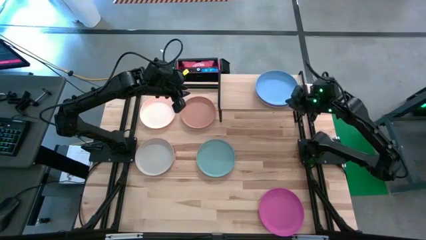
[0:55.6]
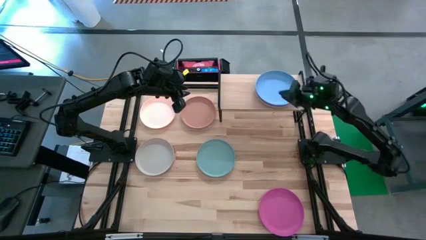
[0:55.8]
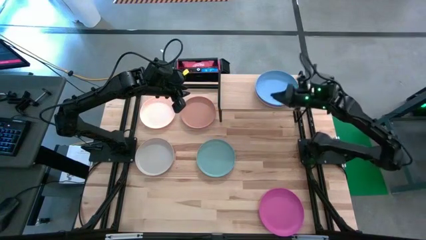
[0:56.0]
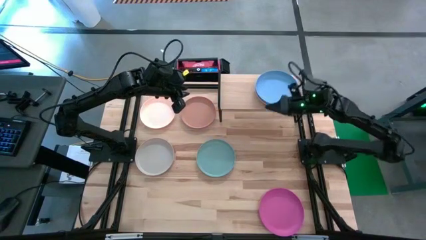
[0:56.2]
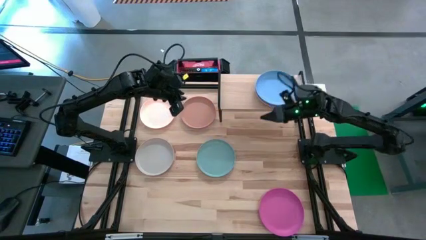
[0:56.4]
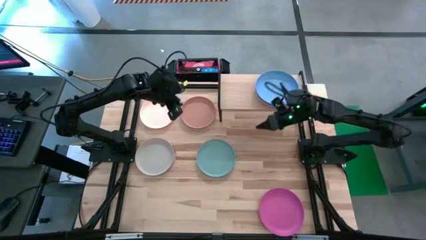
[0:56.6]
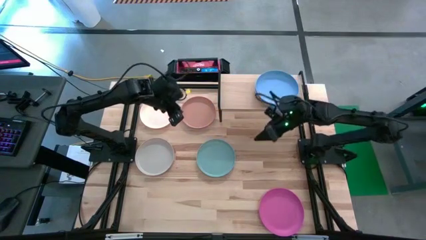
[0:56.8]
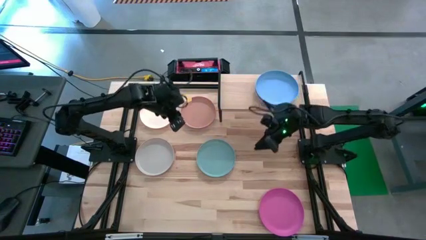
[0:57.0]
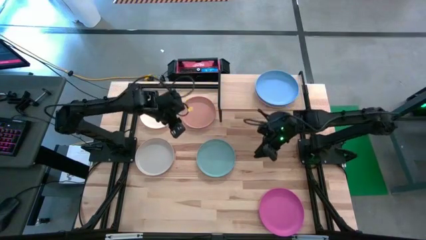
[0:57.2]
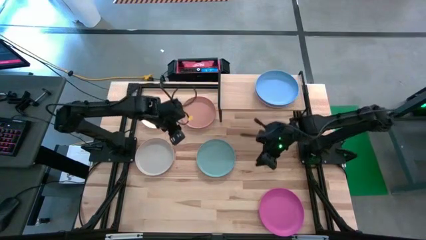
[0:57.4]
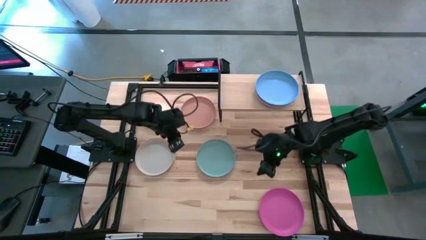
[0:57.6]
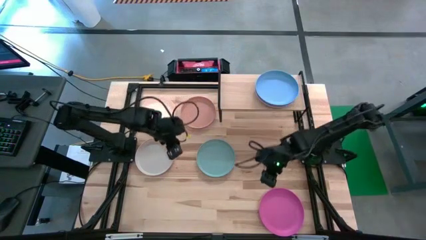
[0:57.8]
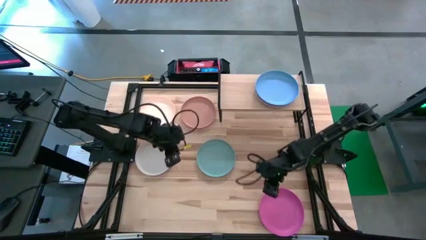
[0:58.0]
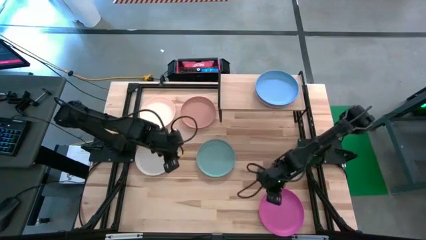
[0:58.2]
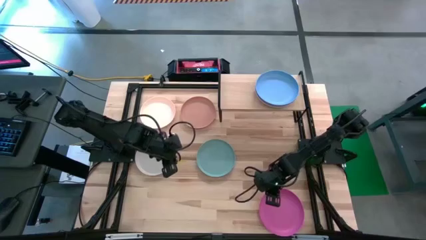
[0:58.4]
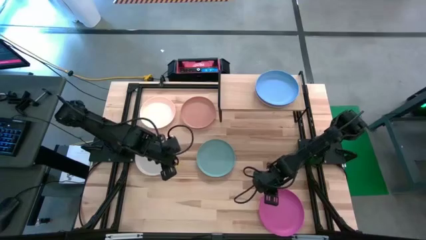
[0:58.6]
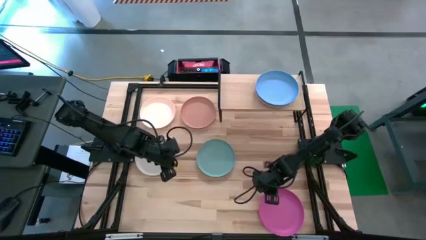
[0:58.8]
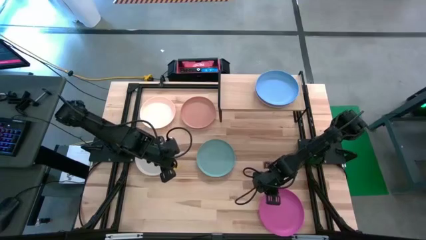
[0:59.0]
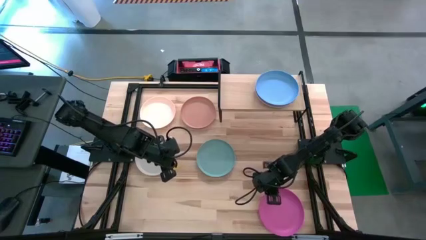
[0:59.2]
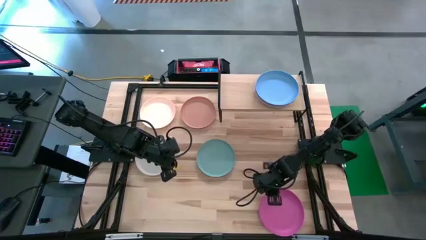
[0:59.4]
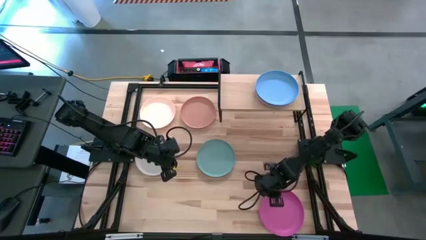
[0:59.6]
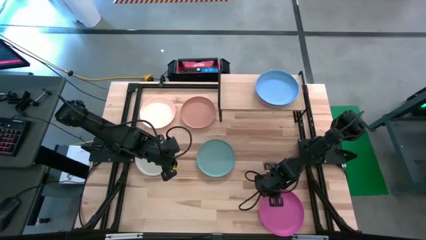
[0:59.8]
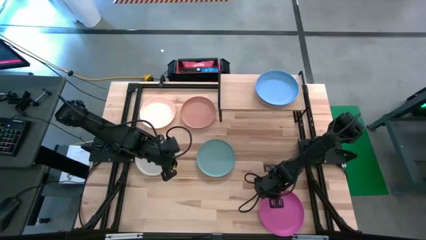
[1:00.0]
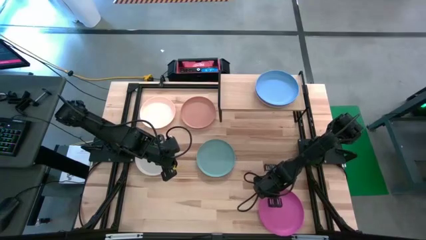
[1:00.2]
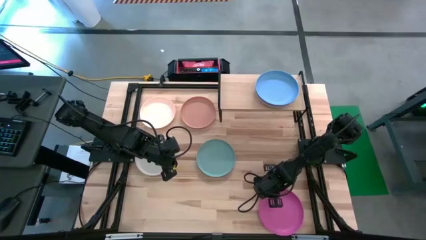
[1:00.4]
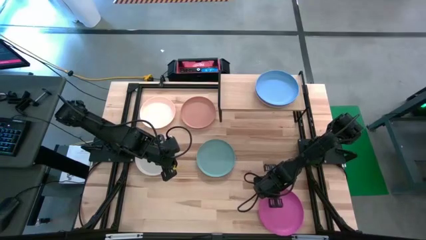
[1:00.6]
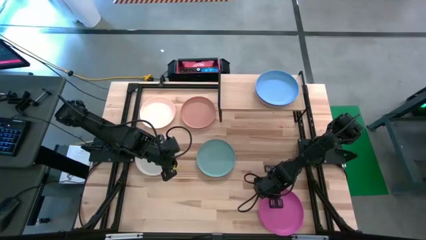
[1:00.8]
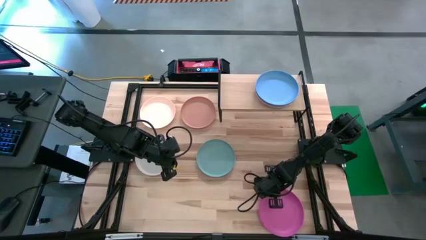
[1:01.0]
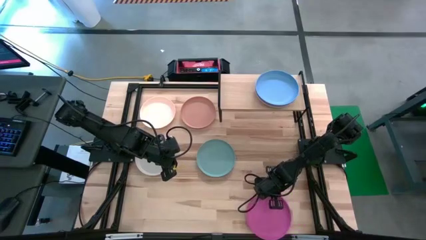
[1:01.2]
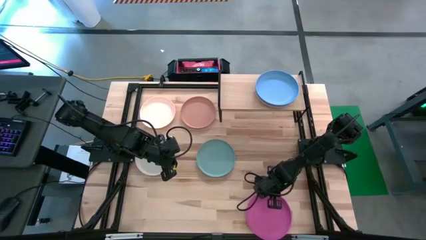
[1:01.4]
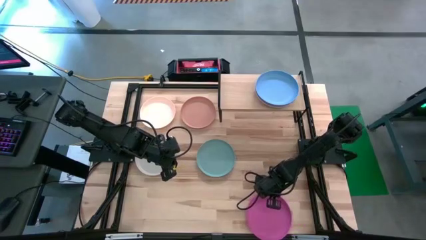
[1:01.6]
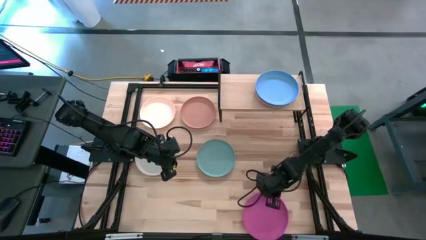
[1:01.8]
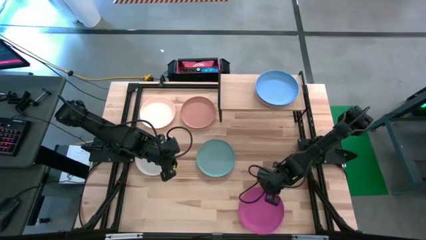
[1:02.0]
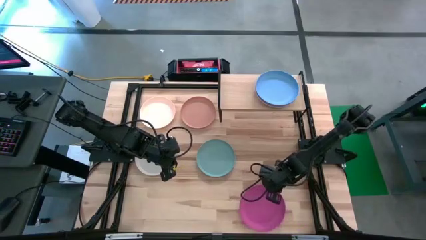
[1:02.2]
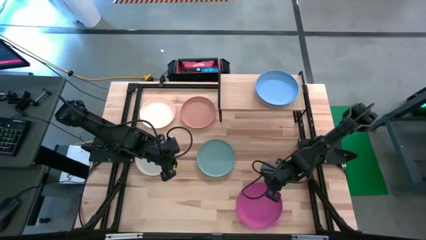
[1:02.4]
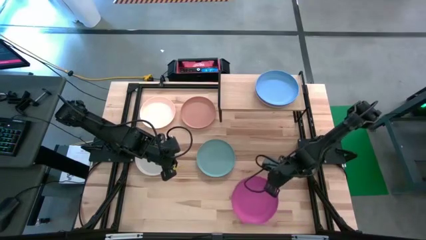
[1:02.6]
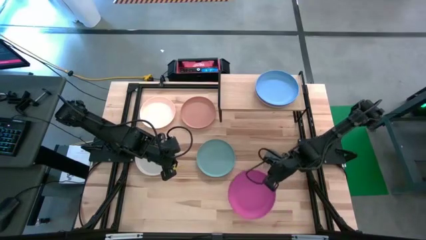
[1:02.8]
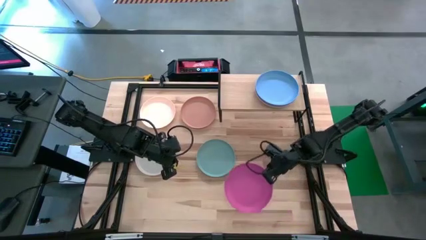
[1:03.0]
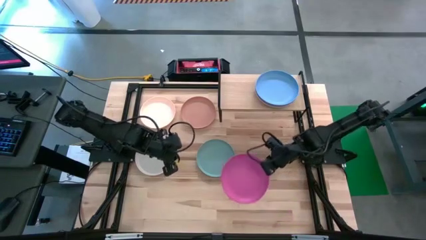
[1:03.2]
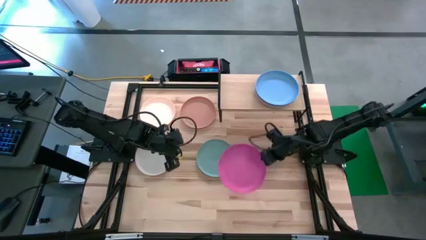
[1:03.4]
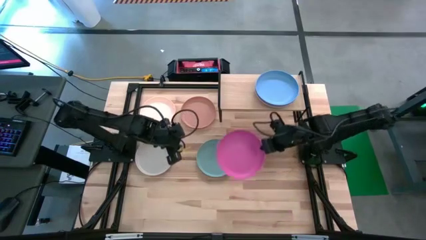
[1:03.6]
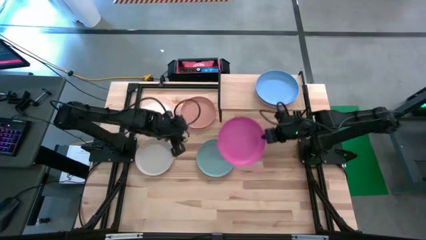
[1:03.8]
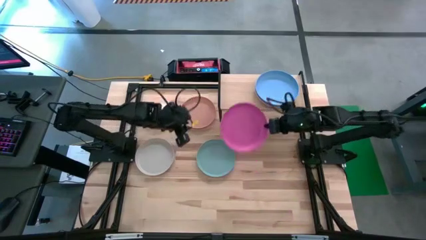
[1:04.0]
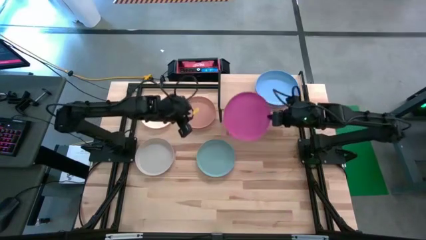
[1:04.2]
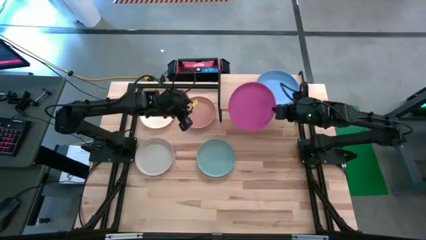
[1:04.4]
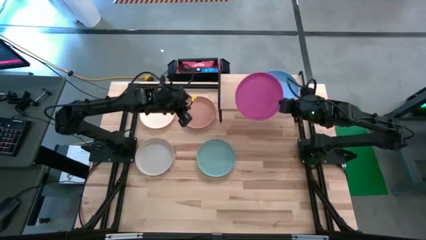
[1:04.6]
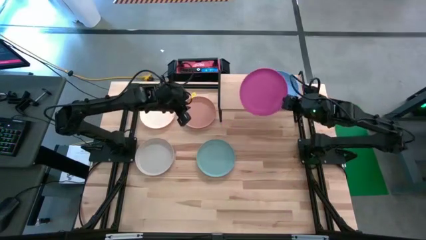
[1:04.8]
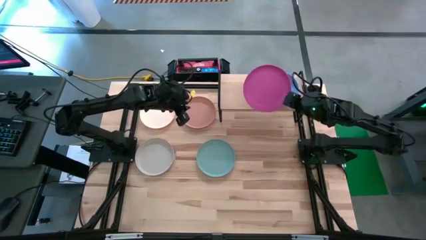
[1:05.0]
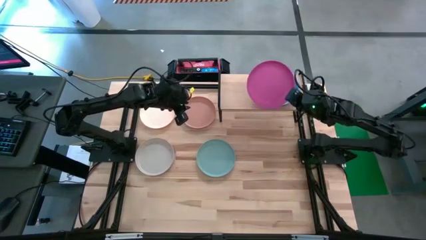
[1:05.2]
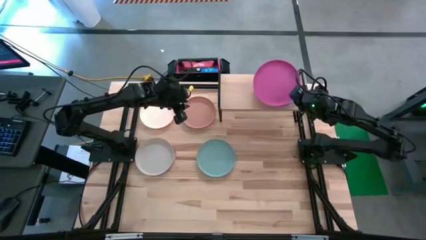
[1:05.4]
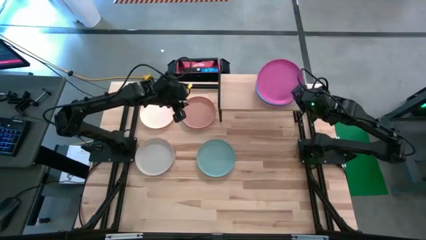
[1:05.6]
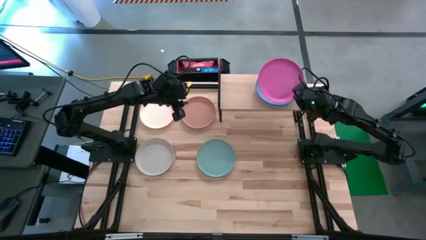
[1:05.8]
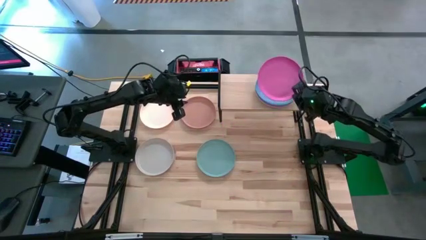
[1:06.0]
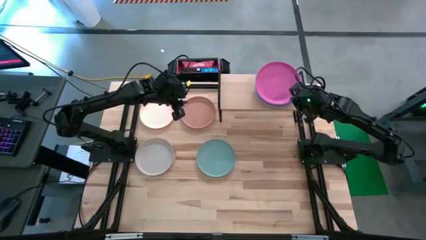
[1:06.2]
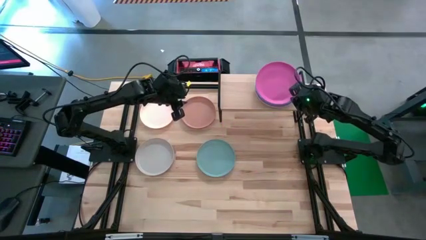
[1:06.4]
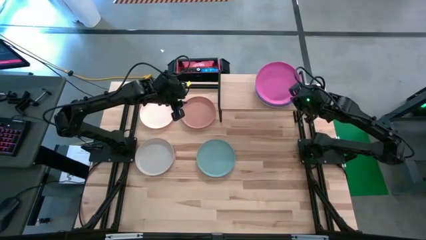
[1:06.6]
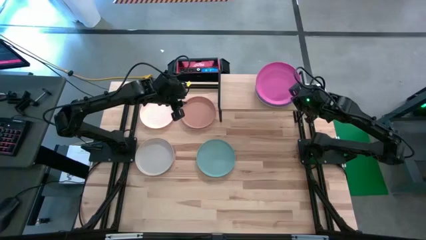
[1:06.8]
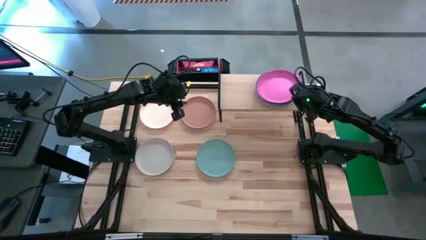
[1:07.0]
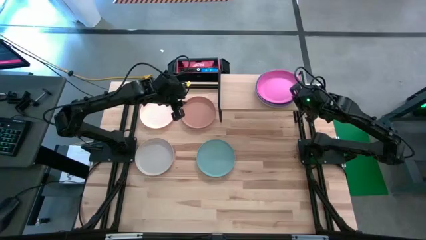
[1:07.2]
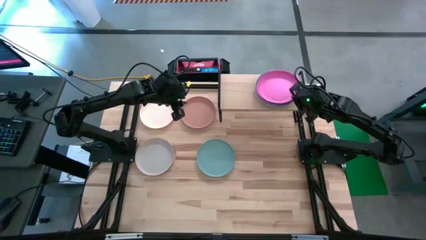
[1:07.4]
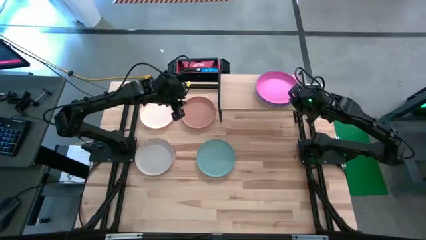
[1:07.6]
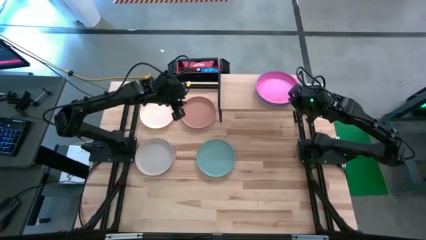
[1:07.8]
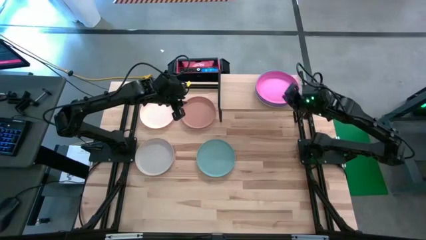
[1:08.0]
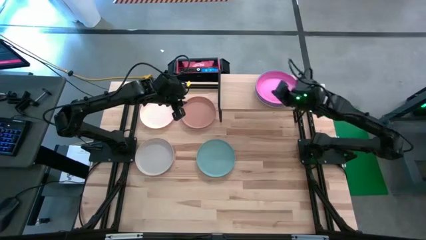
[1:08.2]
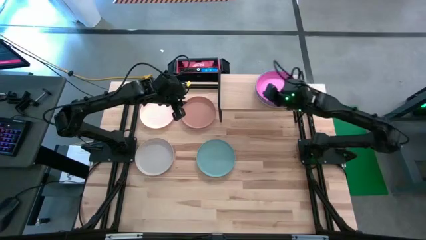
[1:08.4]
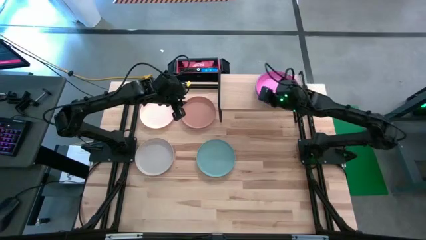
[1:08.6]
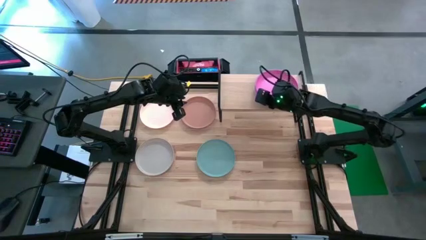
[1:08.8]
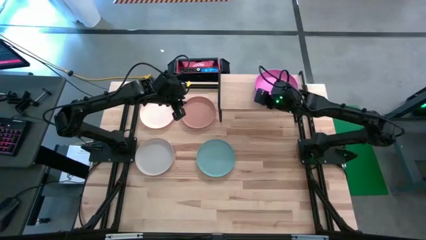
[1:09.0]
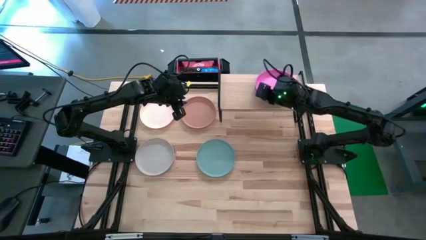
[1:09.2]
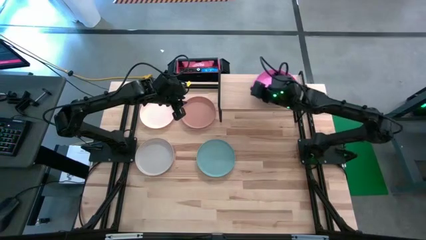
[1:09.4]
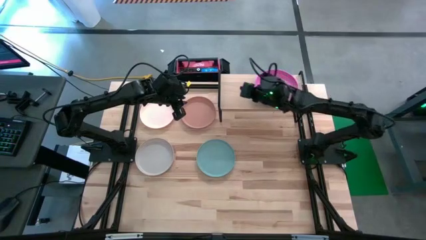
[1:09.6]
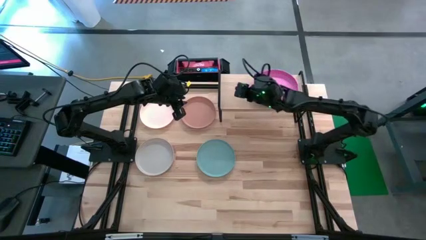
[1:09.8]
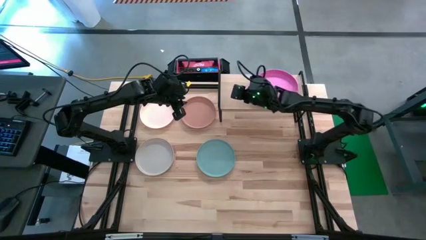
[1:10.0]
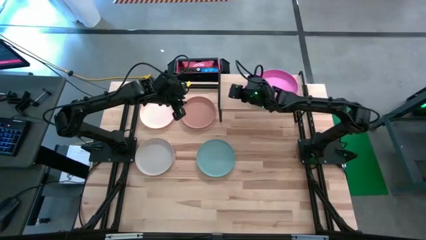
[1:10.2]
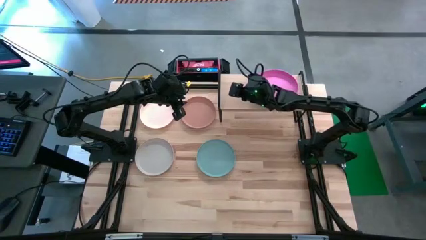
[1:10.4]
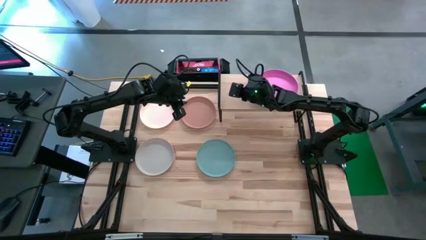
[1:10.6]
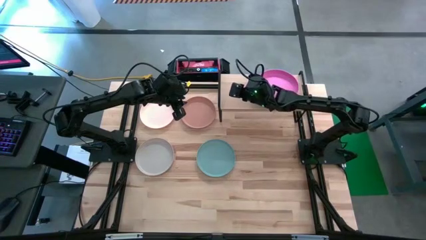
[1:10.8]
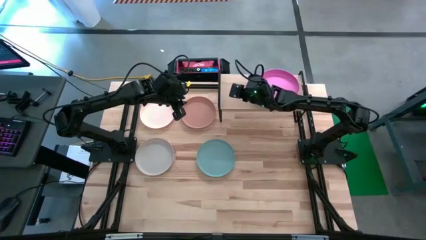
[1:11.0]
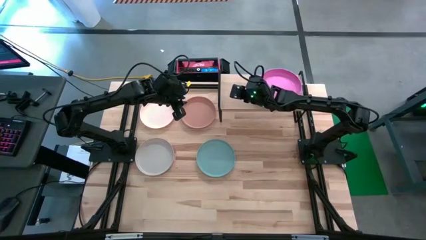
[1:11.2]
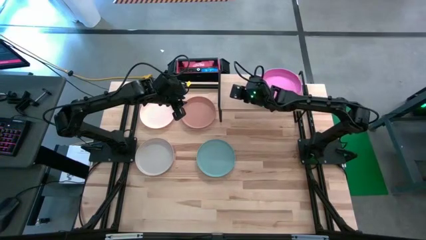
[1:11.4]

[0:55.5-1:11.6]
Task: Place and stack plates onto a shelf
Stack the pink plate on top of the blue plate on the shelf
